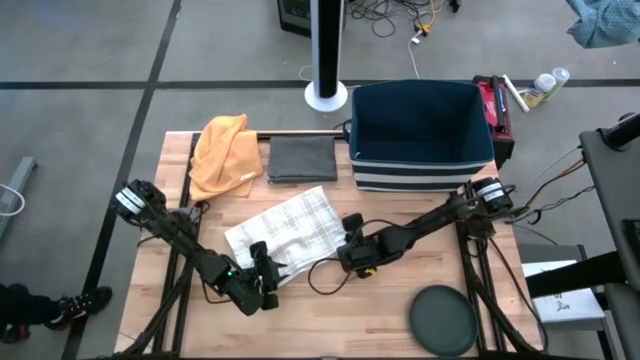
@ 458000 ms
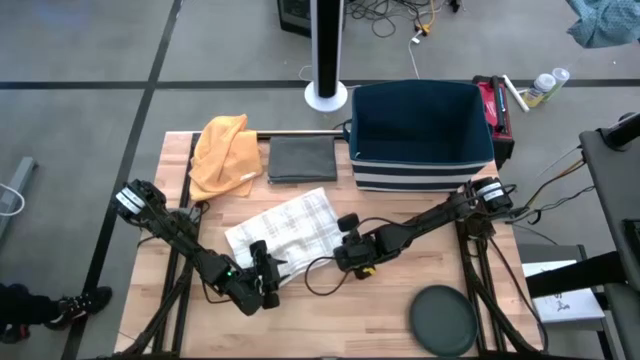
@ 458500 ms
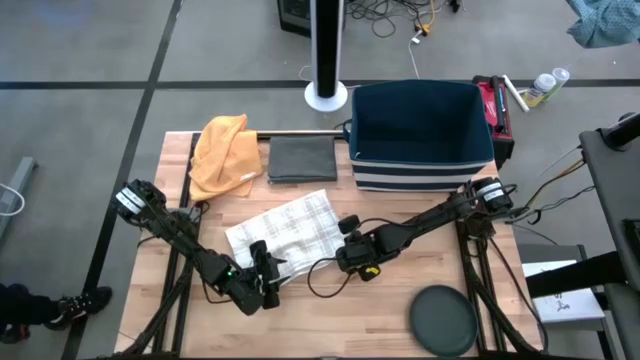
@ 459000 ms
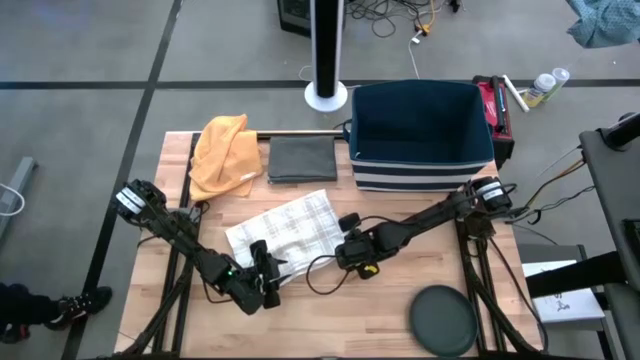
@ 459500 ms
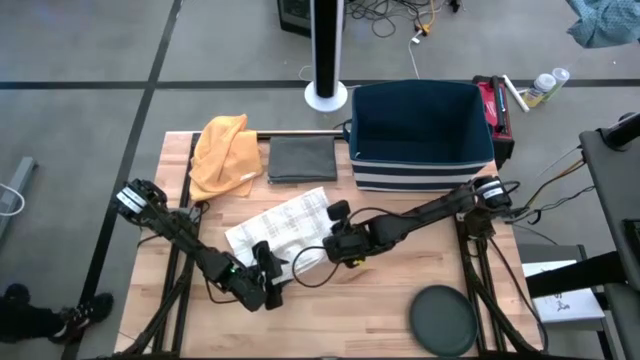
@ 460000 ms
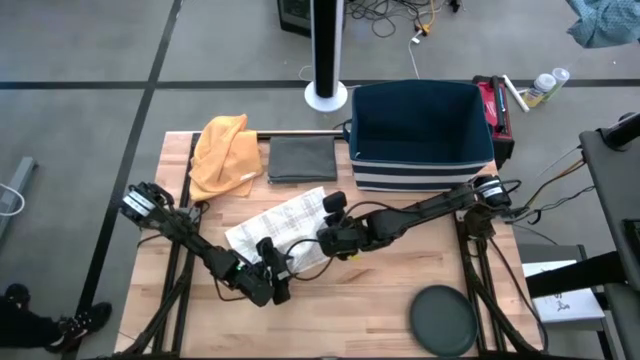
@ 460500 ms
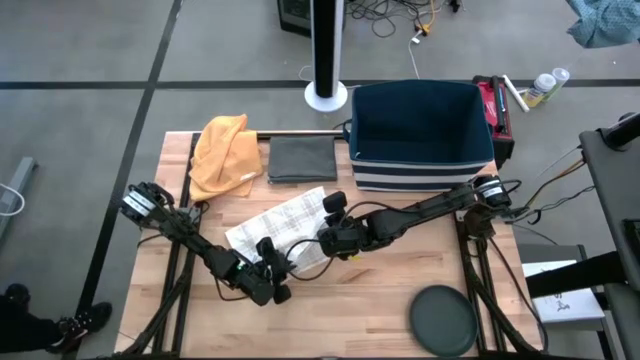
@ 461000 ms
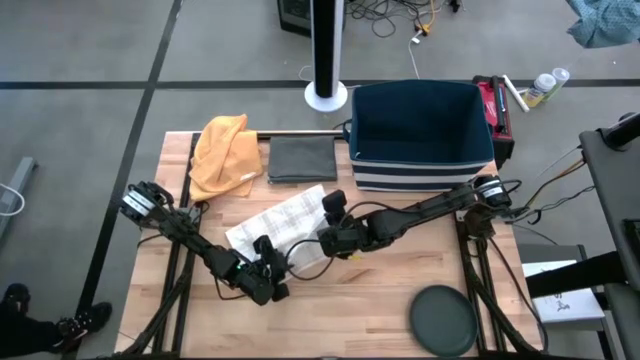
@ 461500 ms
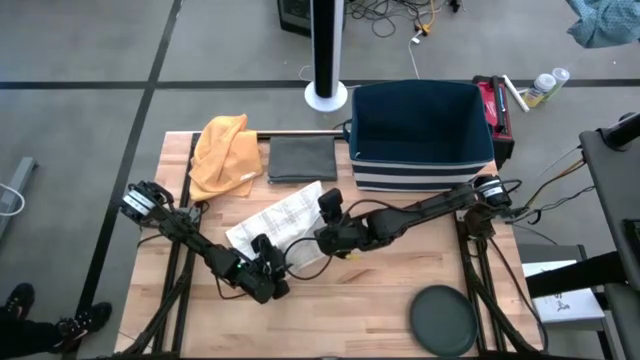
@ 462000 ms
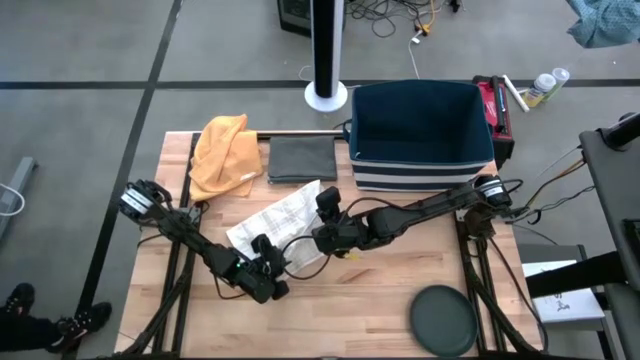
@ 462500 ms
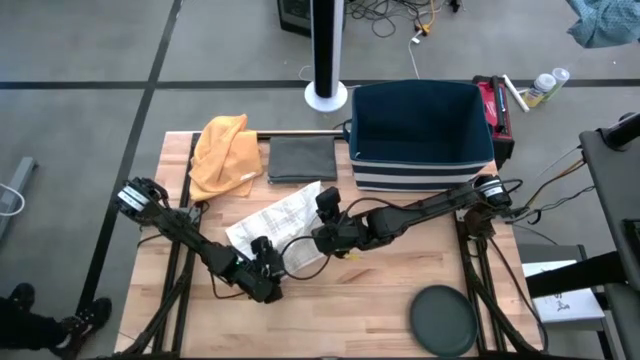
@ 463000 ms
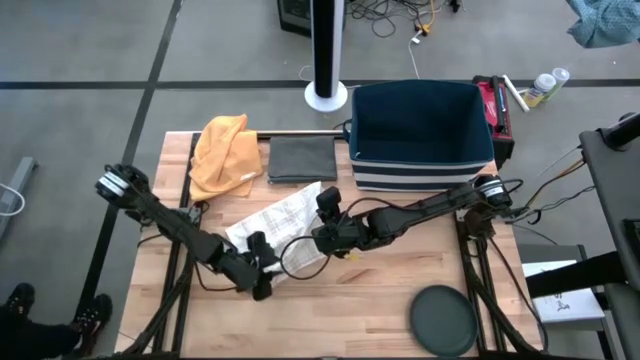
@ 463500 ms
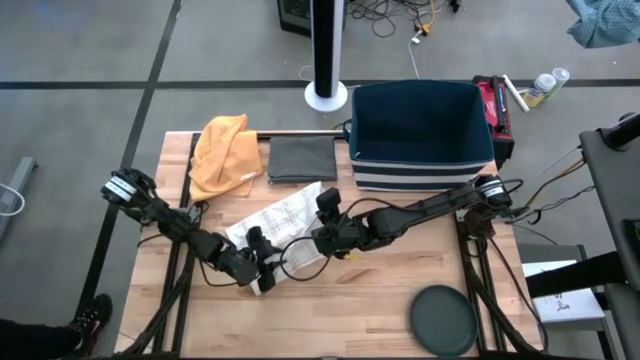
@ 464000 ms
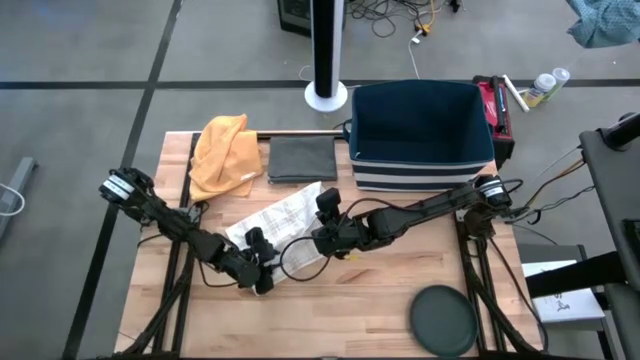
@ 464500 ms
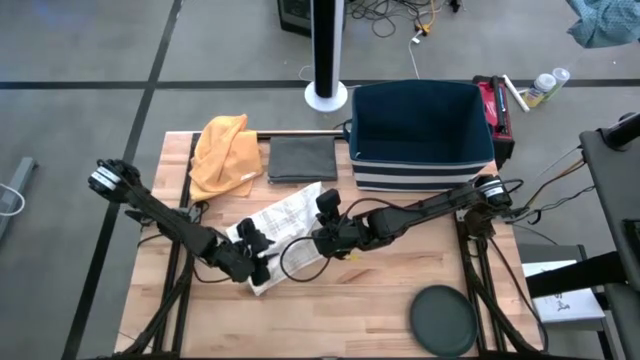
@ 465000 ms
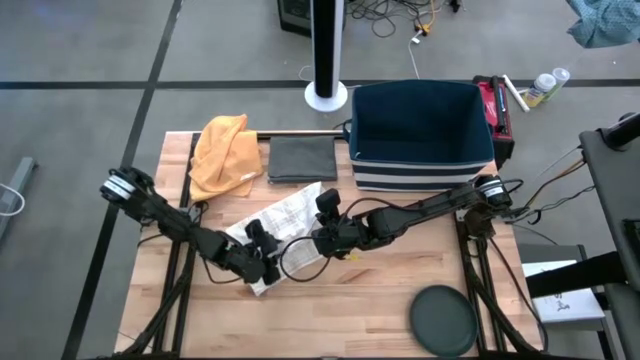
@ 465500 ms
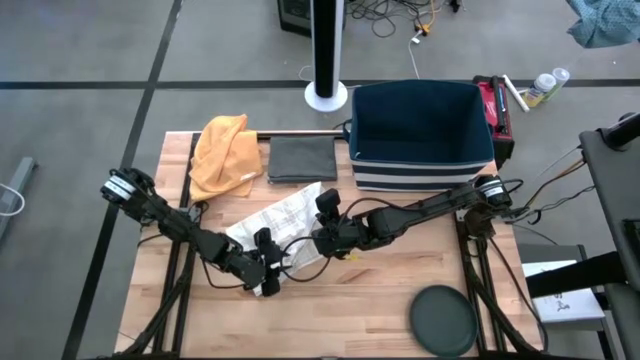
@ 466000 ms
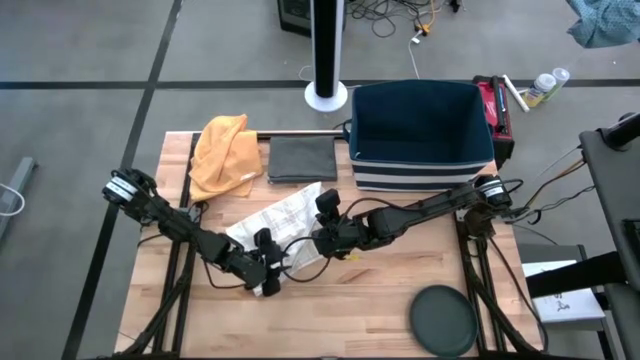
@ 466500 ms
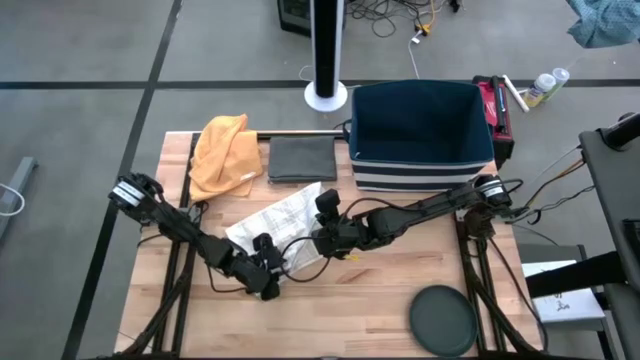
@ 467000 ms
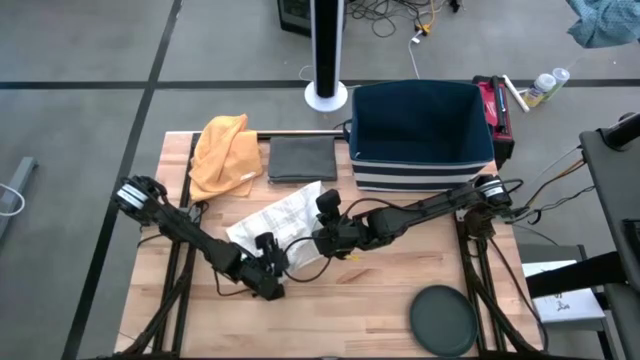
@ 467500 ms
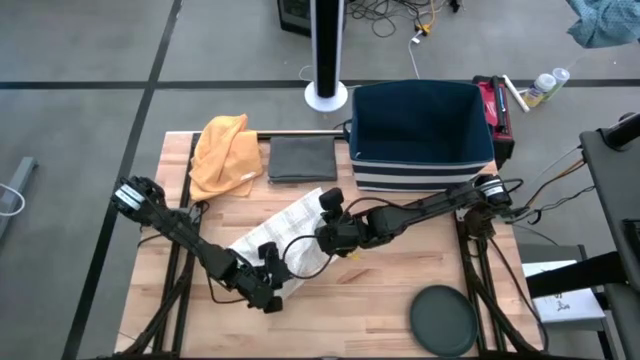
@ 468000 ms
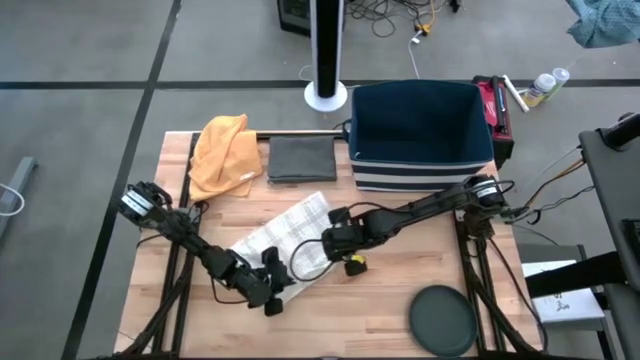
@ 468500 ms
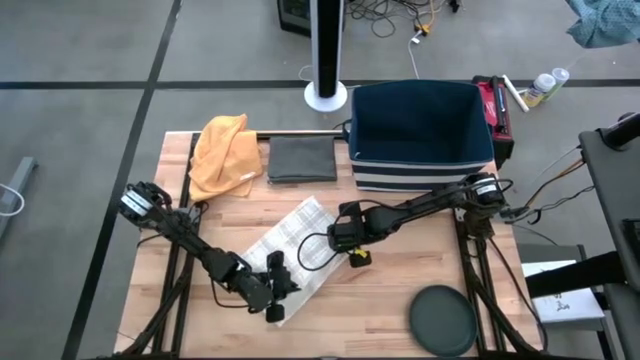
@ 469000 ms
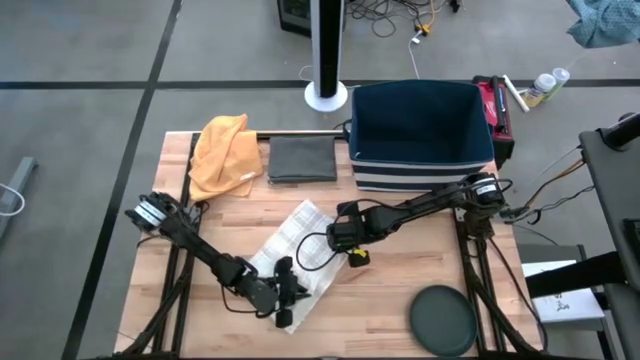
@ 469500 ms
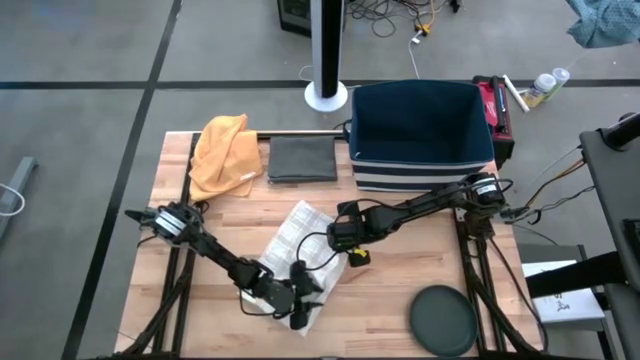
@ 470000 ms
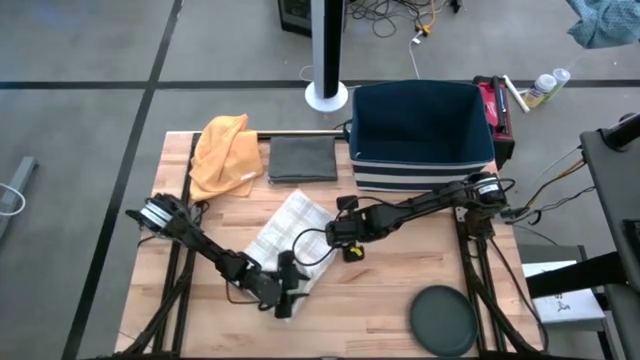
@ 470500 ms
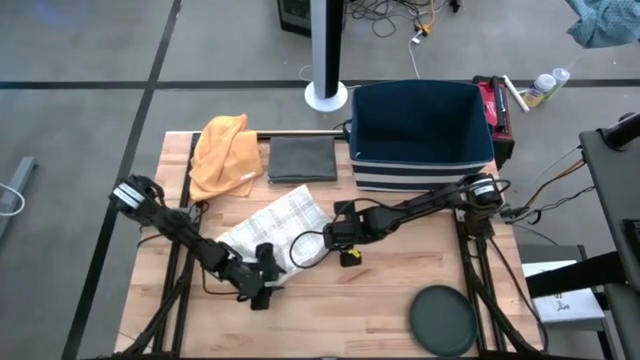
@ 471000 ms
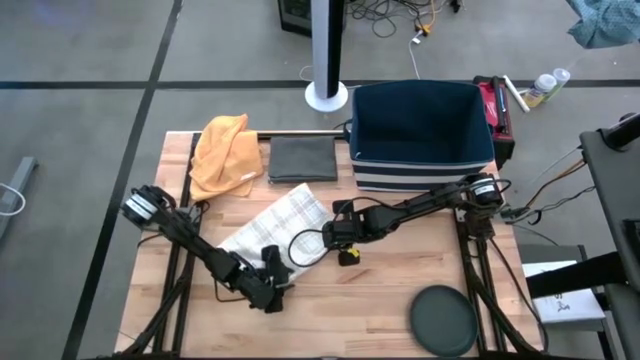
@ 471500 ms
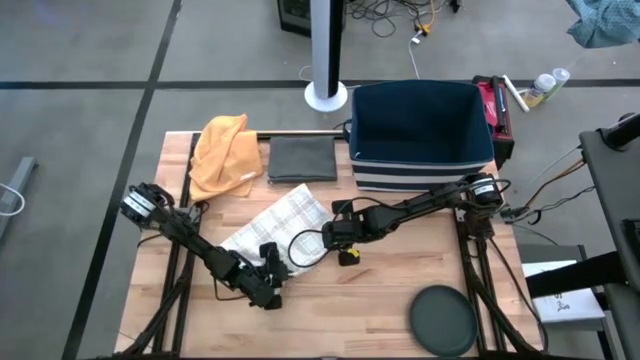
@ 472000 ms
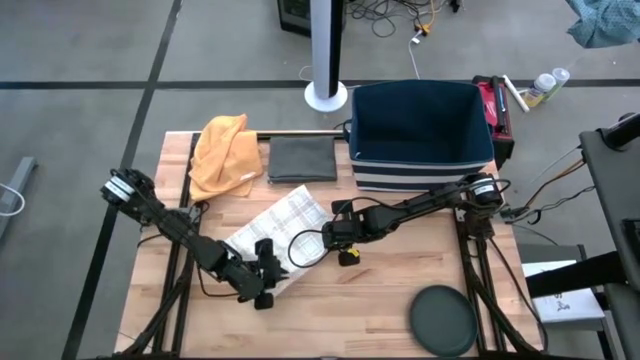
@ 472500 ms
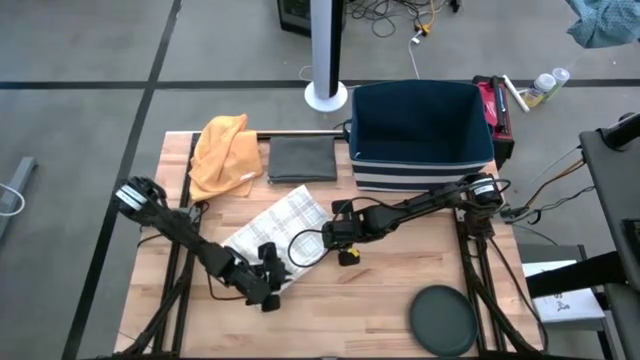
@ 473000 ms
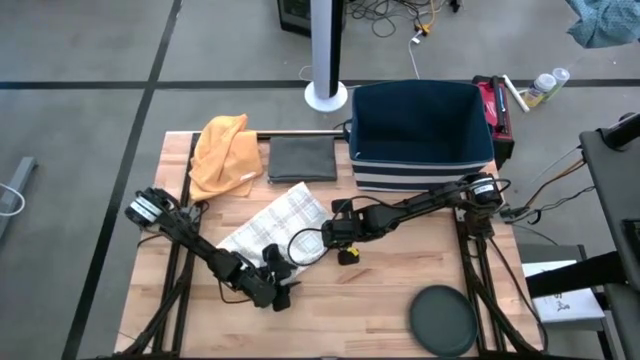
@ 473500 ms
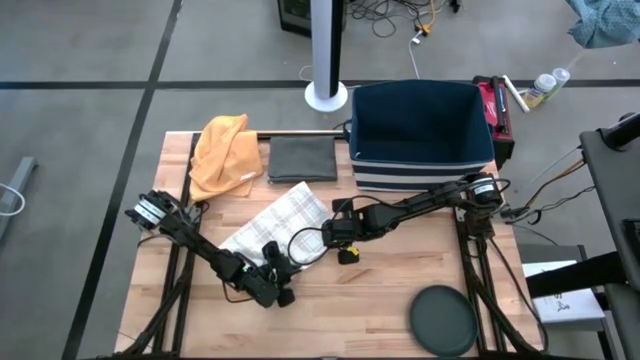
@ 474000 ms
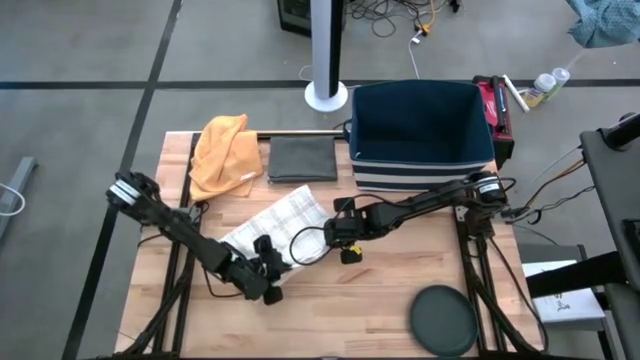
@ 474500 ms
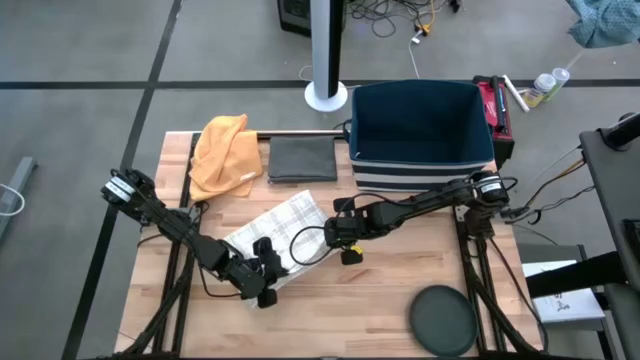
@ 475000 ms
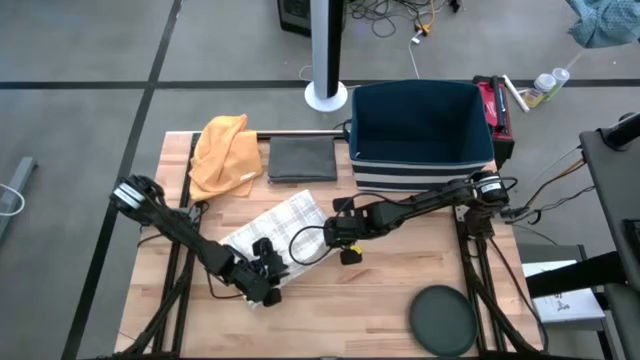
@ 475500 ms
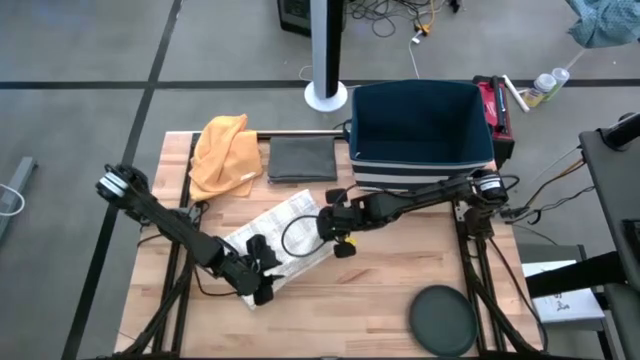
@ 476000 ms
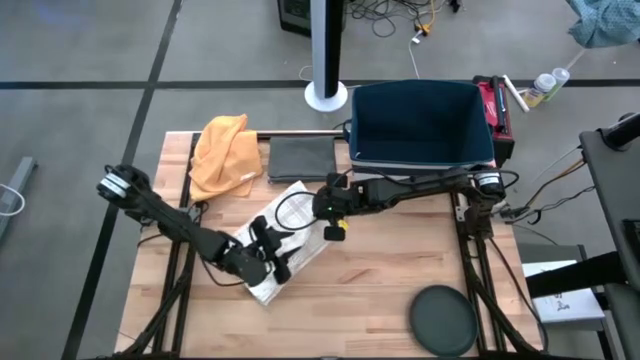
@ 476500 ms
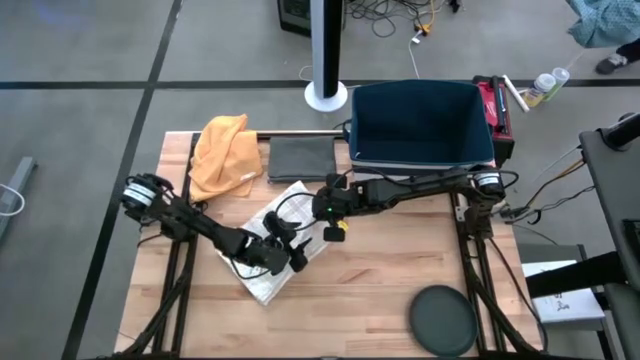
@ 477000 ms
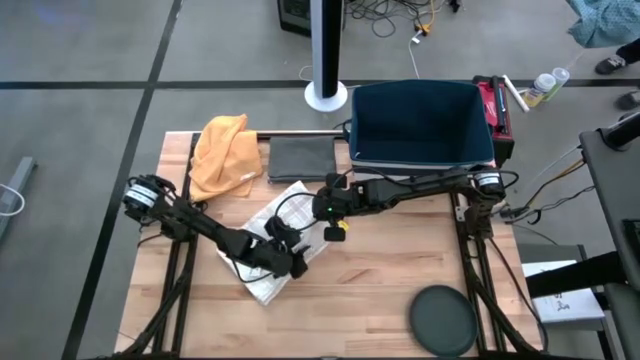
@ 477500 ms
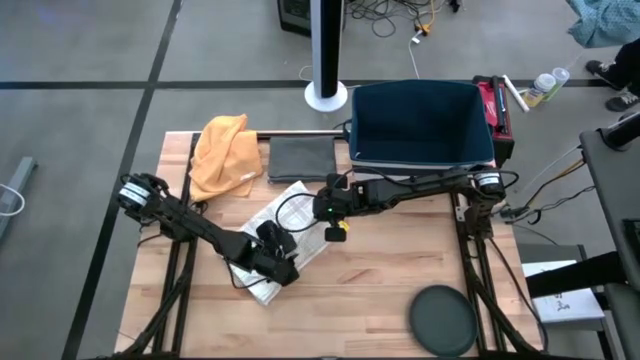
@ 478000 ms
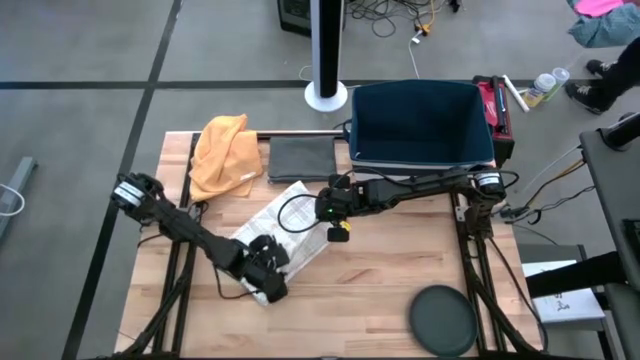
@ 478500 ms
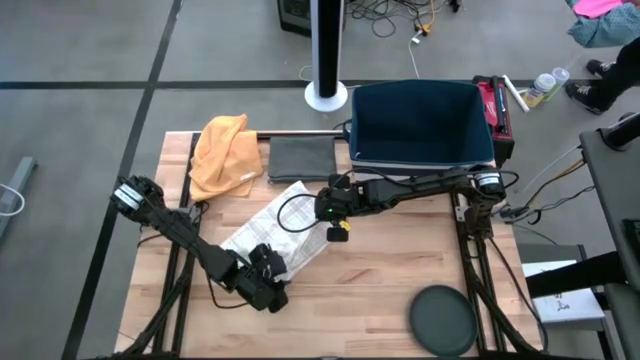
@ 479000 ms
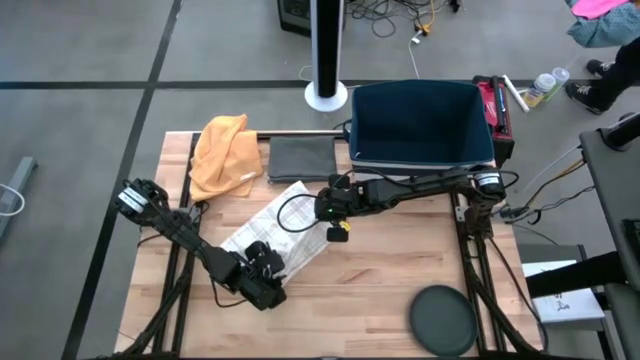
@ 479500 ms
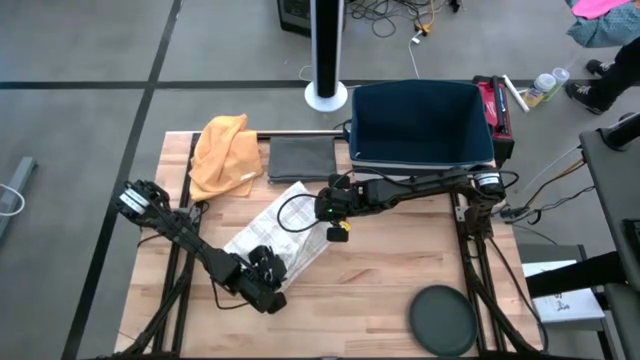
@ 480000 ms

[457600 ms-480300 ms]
Task: Fold kitchen towel into neat rectangle
Fold the white patterned towel
